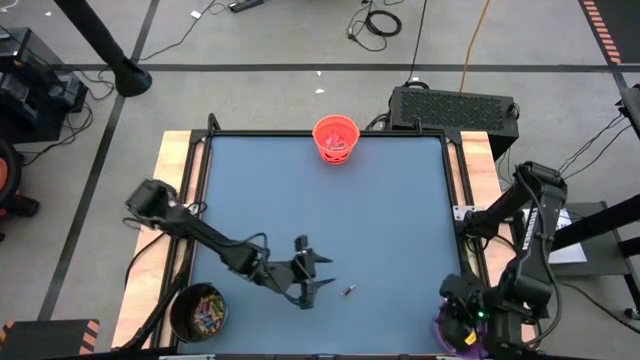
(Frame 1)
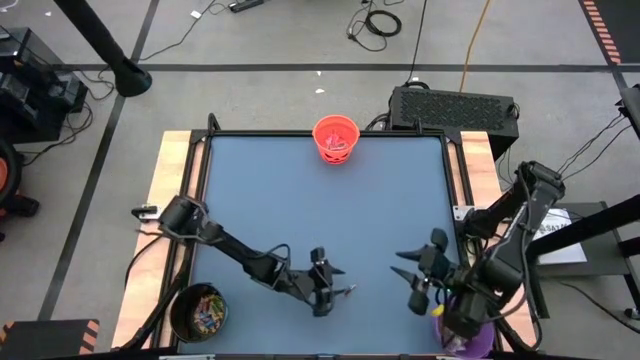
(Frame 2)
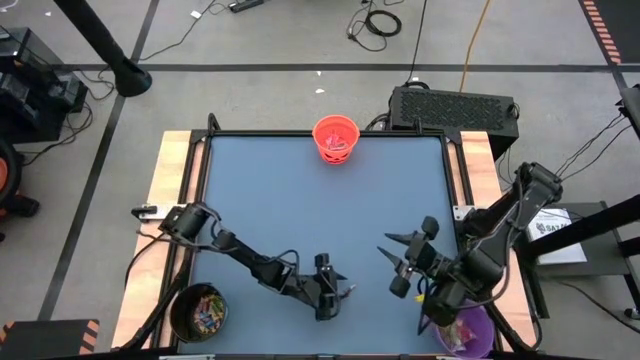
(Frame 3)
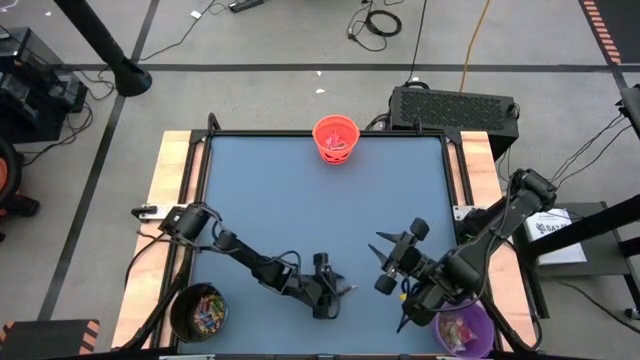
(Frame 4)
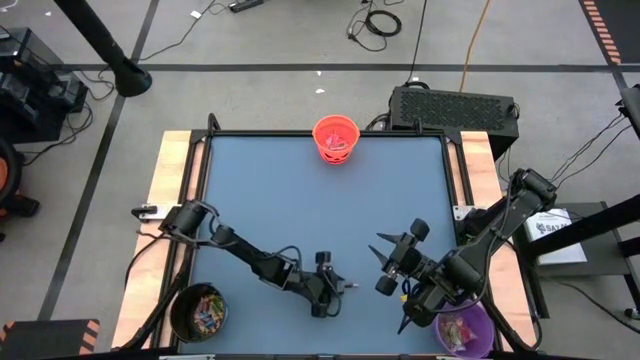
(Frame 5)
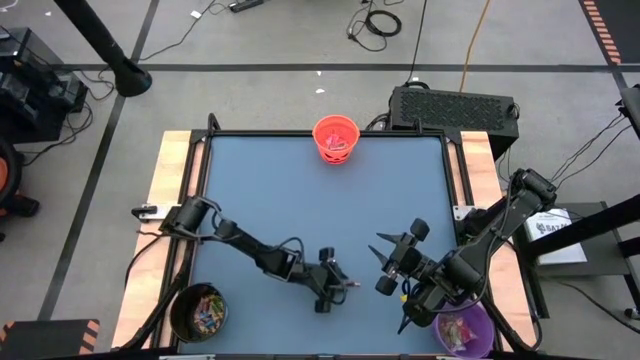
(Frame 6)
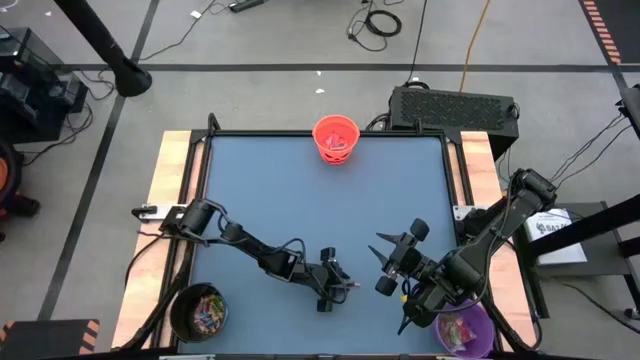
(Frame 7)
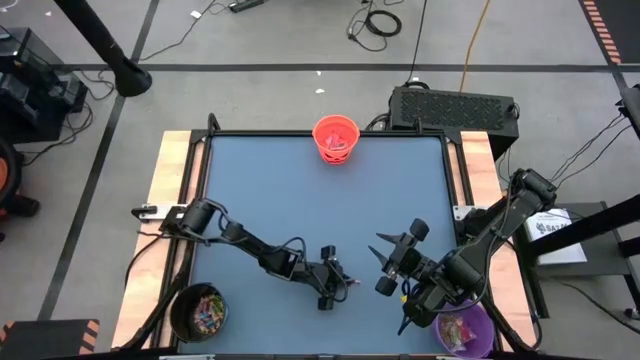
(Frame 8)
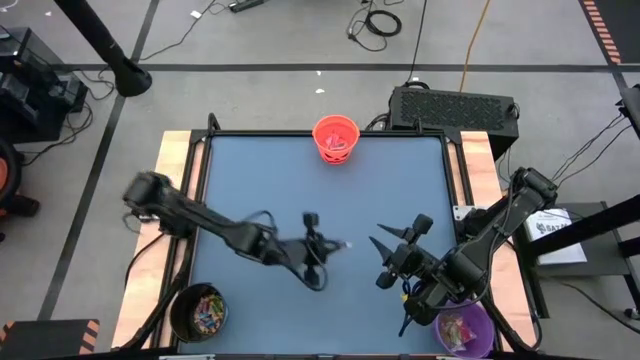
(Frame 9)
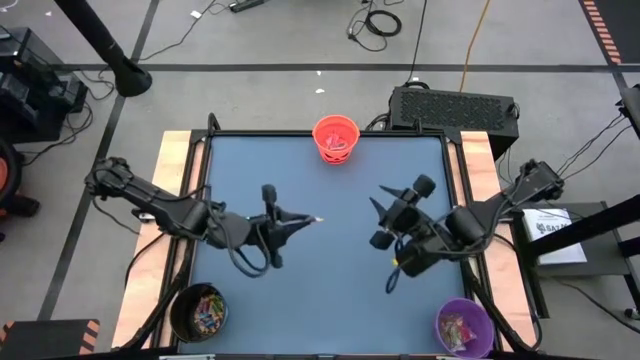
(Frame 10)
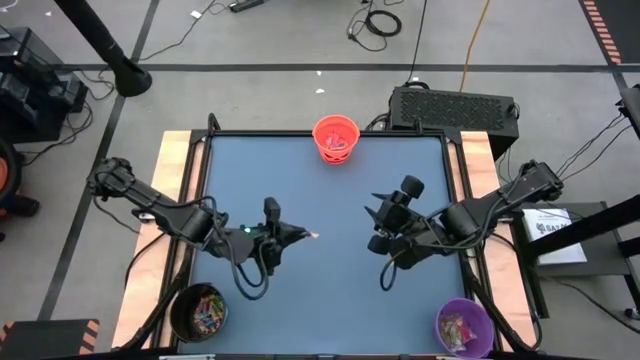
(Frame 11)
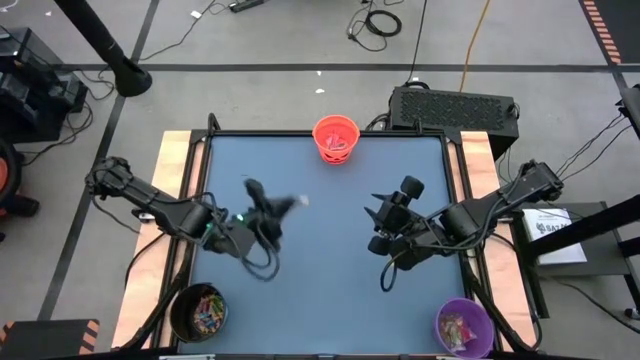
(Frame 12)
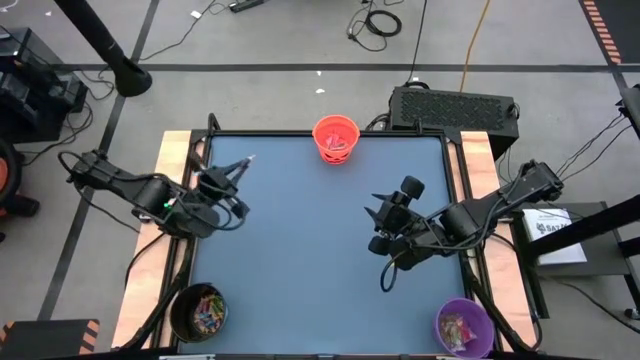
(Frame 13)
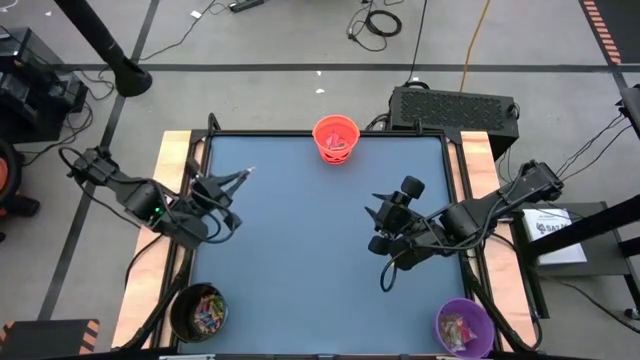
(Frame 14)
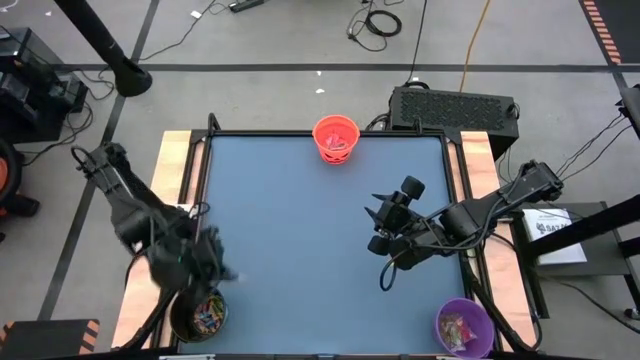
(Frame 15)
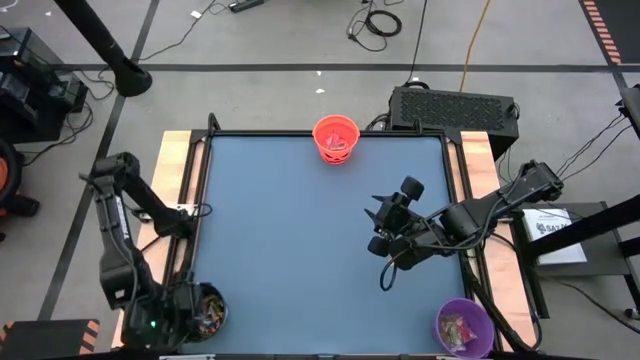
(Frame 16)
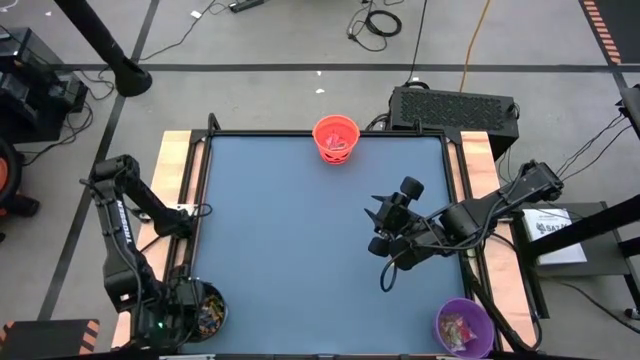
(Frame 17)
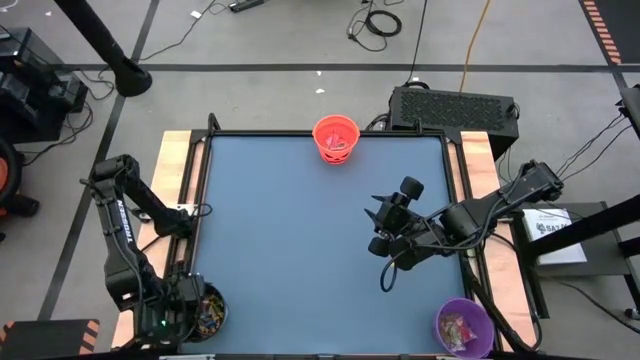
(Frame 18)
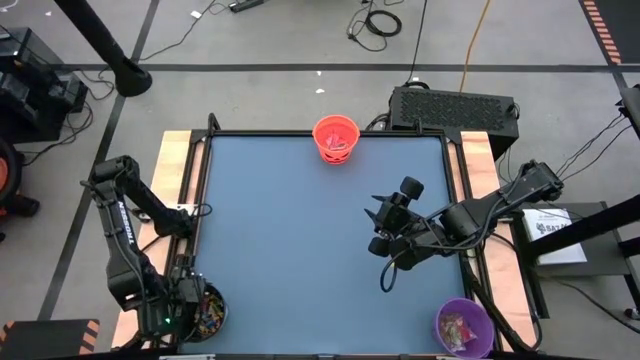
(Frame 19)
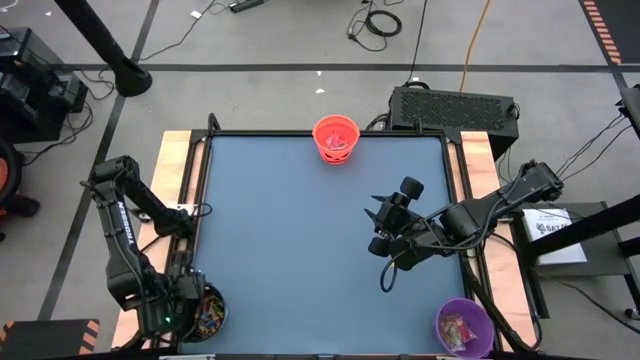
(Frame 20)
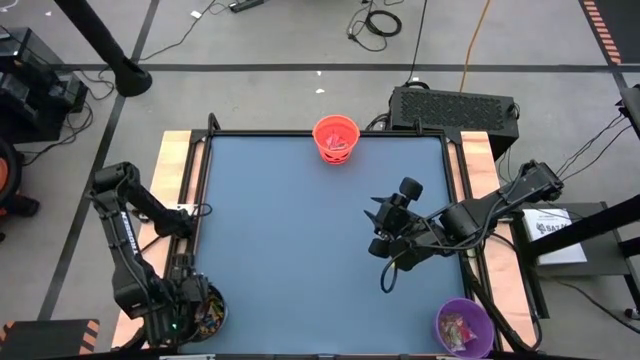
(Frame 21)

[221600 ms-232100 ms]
Task: Sort candy by brand, put in halloween buckets
Put the red candy into the black bucket

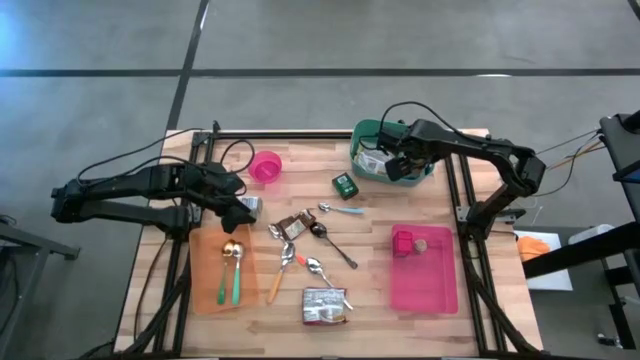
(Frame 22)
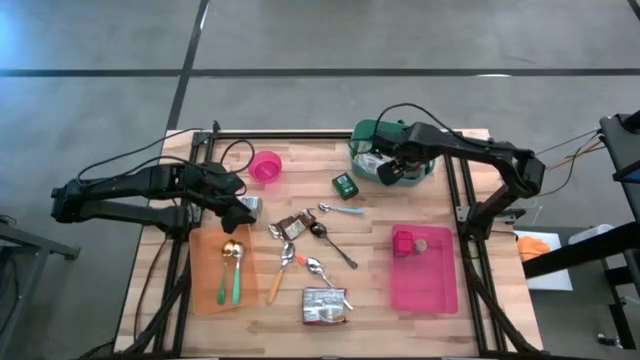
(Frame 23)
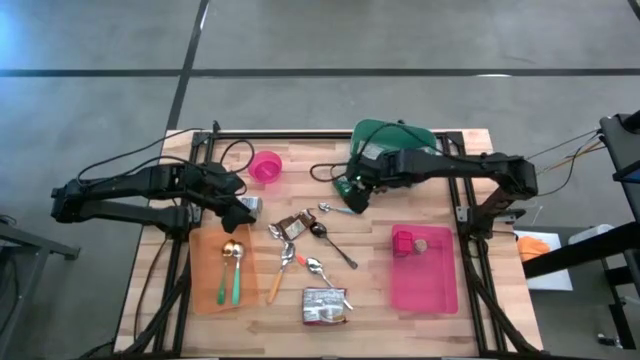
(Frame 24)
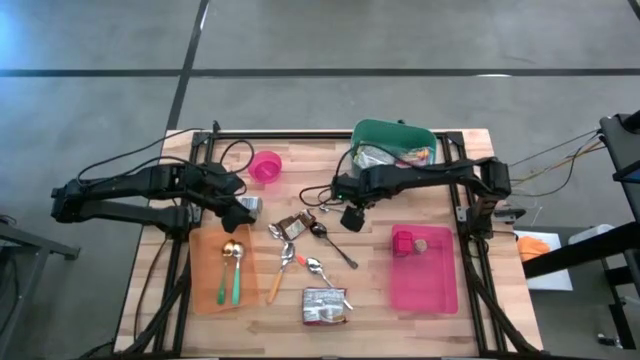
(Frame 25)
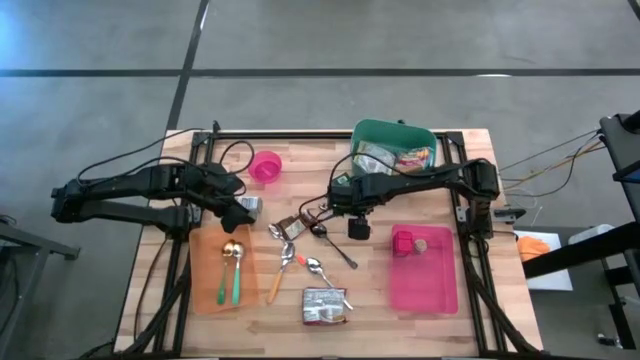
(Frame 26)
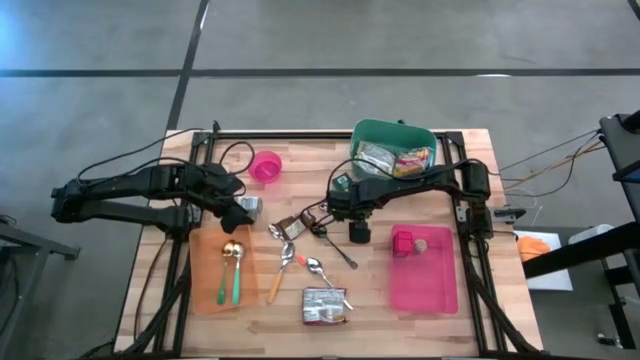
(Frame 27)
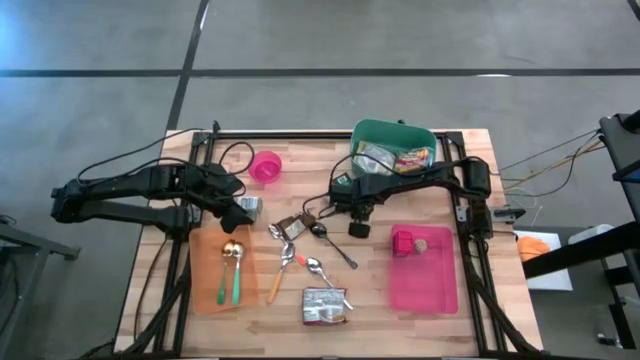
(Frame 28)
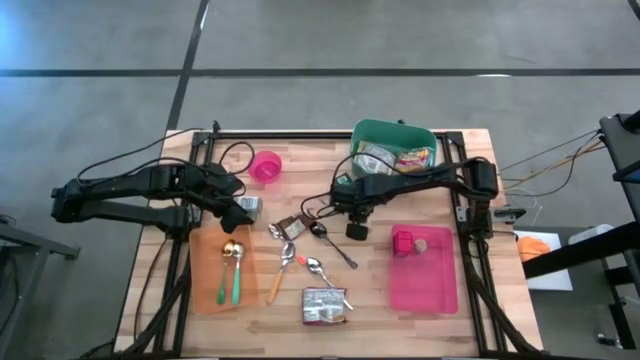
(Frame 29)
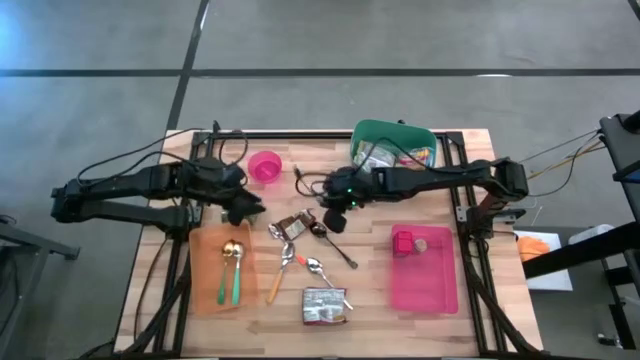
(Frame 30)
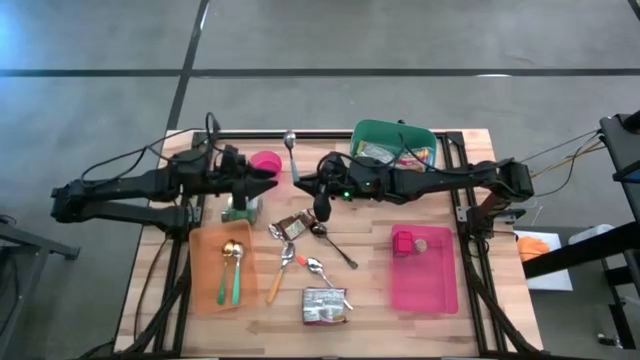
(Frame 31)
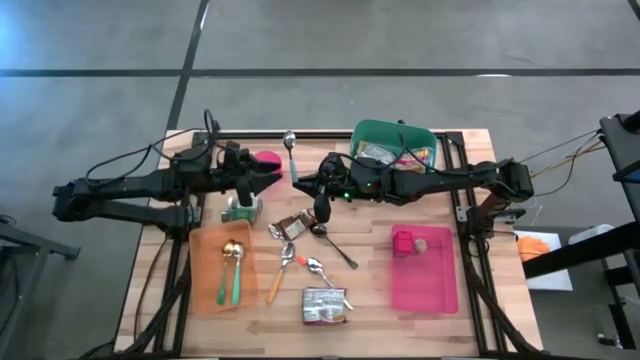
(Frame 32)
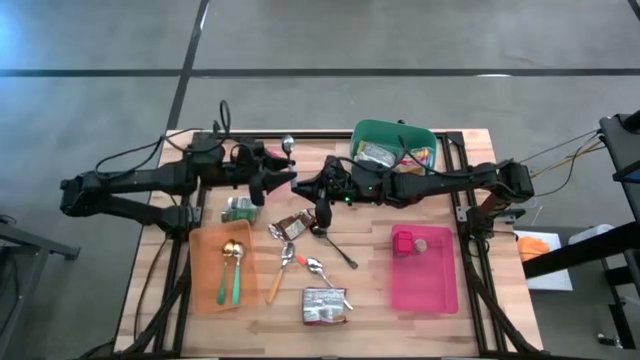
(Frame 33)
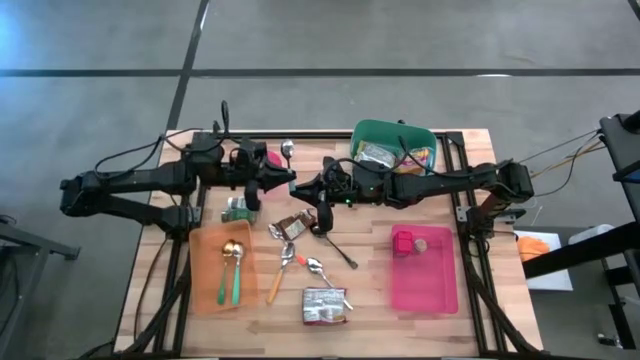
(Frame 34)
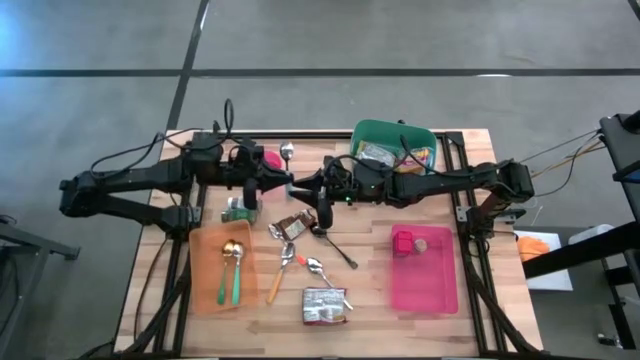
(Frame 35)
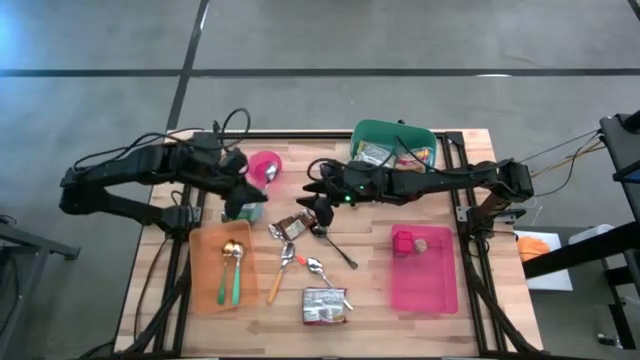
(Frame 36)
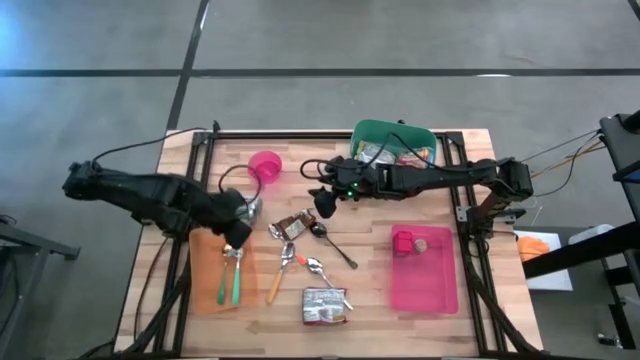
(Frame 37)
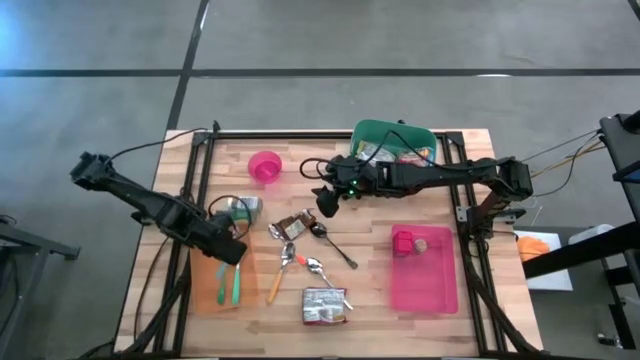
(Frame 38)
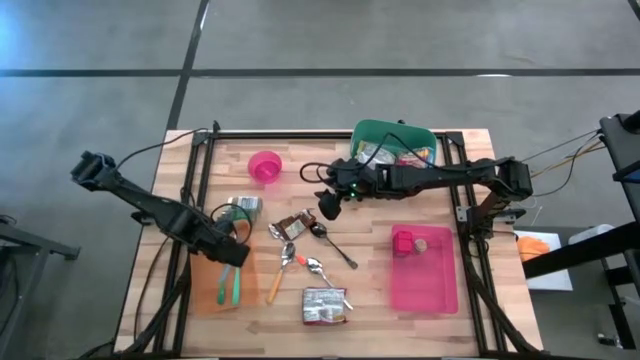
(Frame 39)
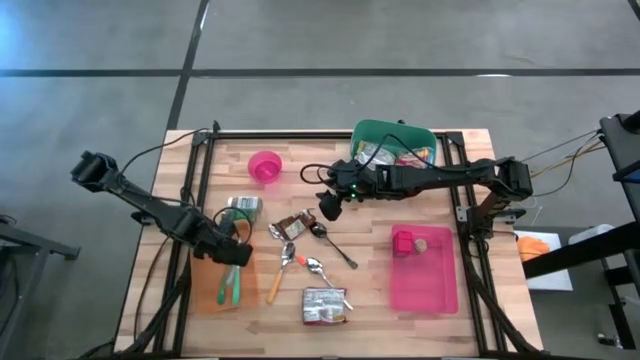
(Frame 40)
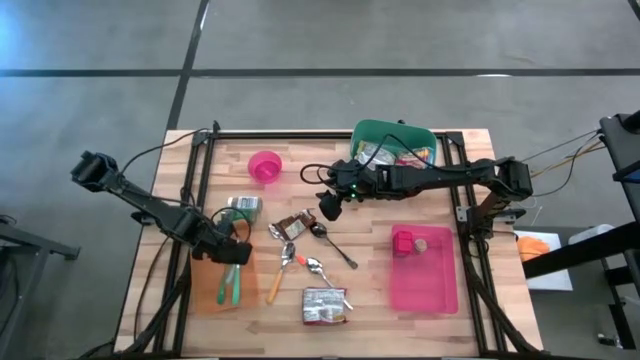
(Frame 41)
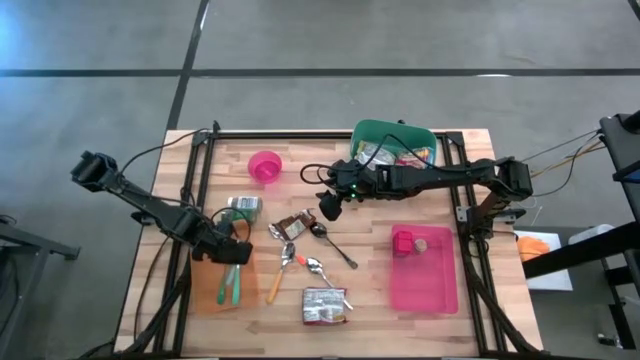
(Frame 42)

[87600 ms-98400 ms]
Task: Pick & Place Food Item
Put the blue spoon into the orange bin
